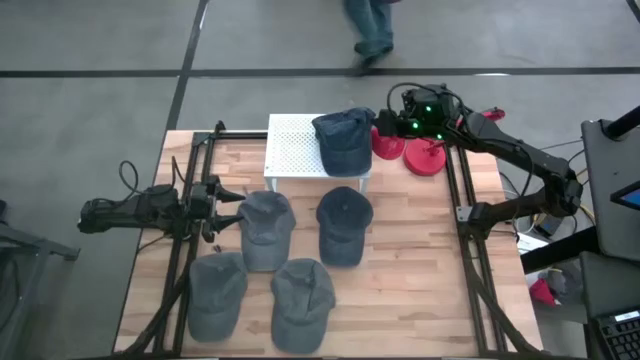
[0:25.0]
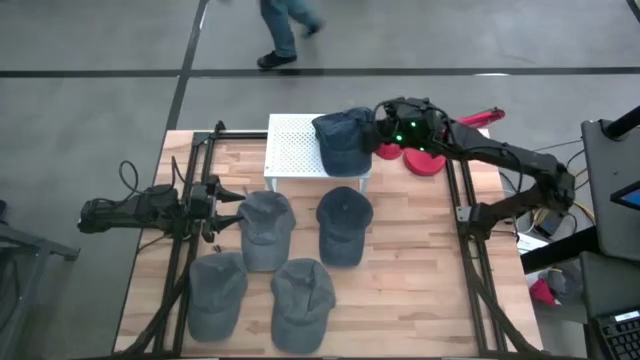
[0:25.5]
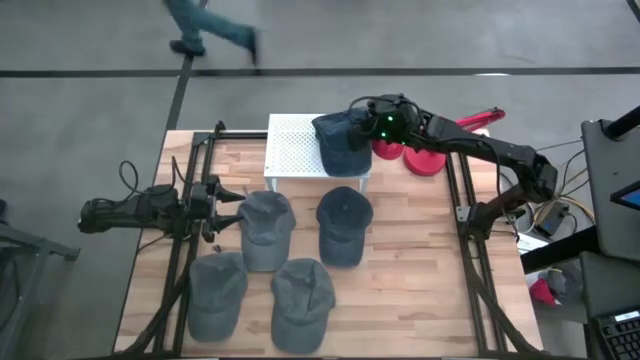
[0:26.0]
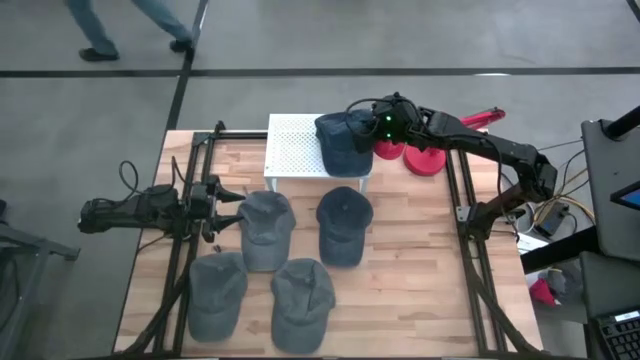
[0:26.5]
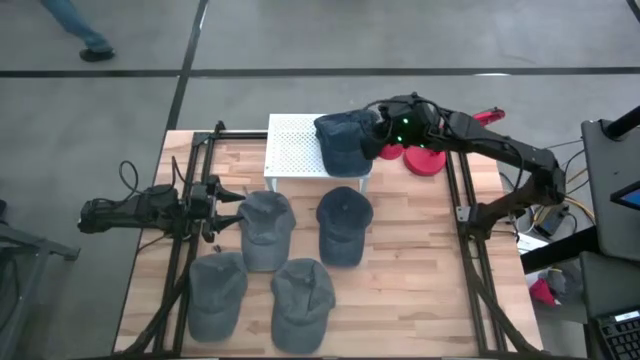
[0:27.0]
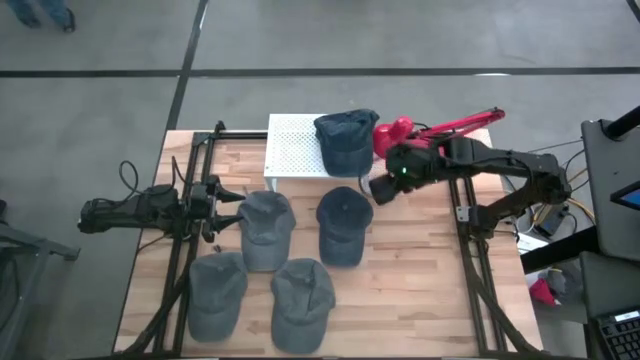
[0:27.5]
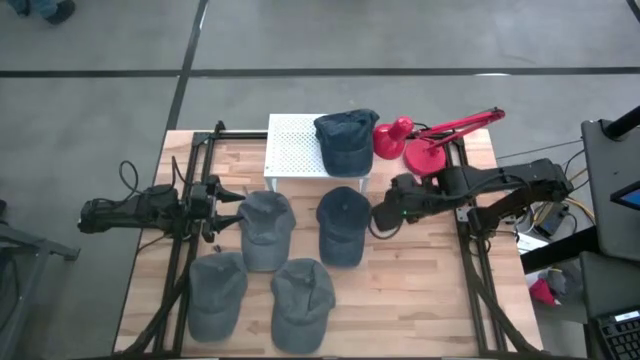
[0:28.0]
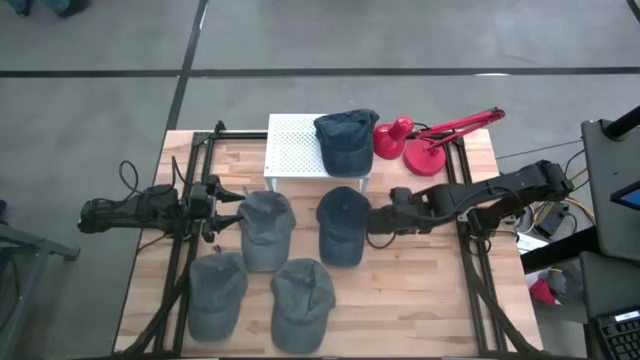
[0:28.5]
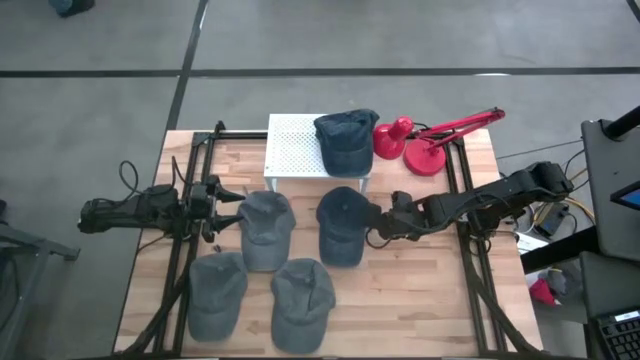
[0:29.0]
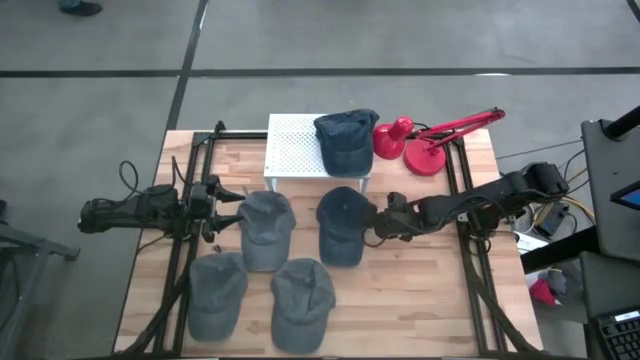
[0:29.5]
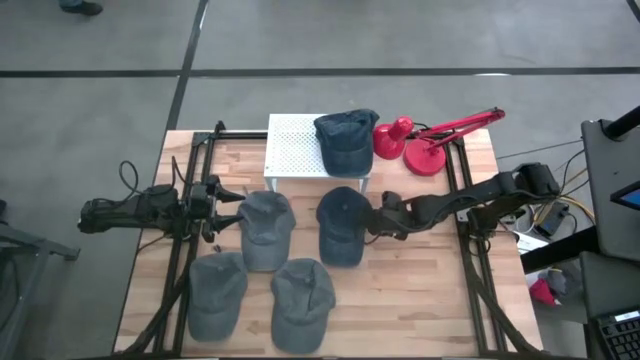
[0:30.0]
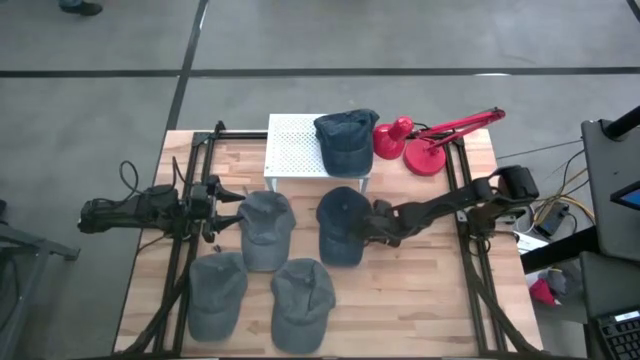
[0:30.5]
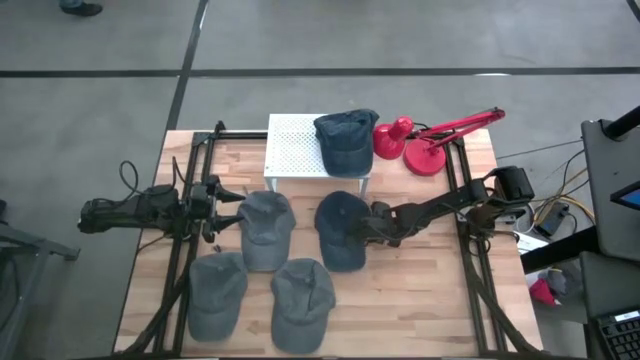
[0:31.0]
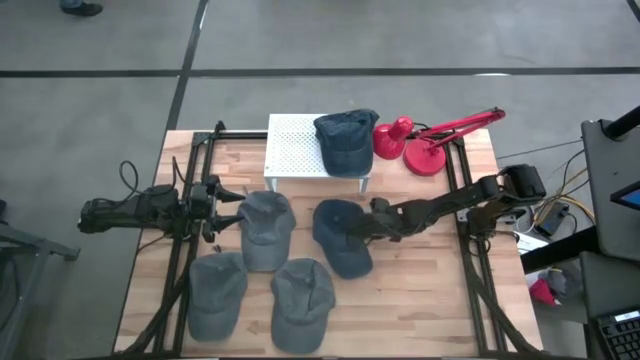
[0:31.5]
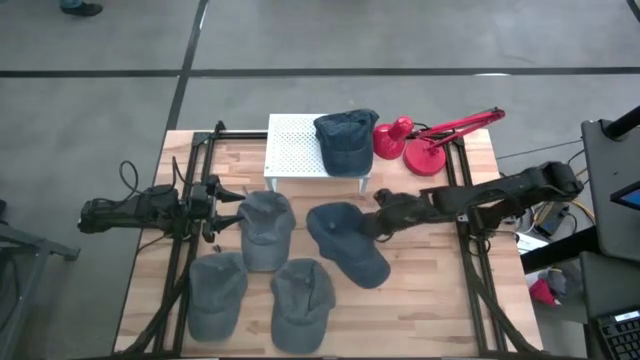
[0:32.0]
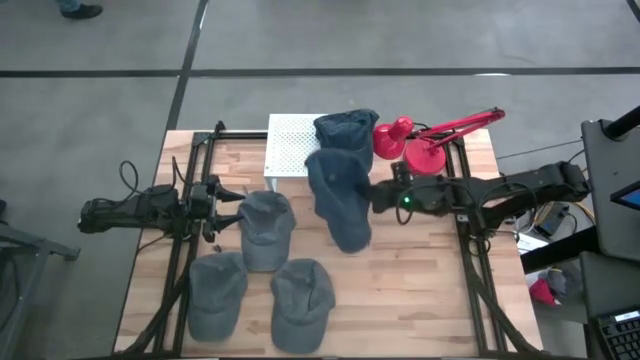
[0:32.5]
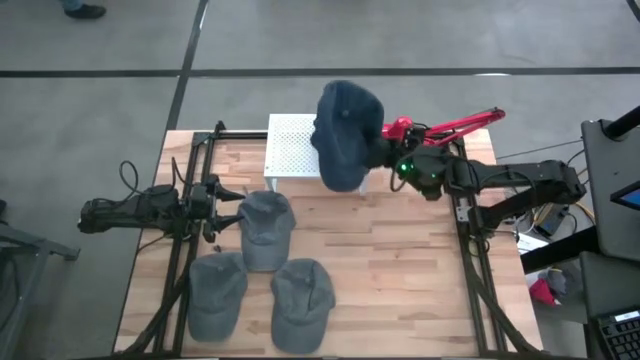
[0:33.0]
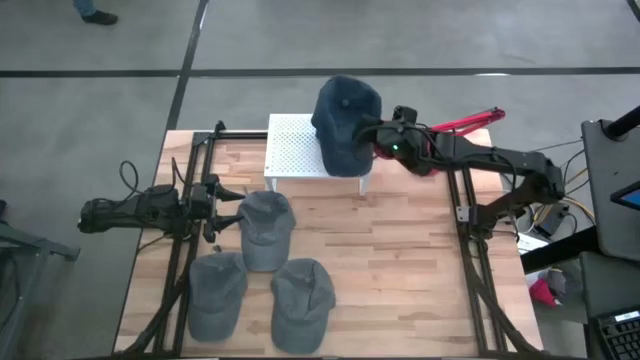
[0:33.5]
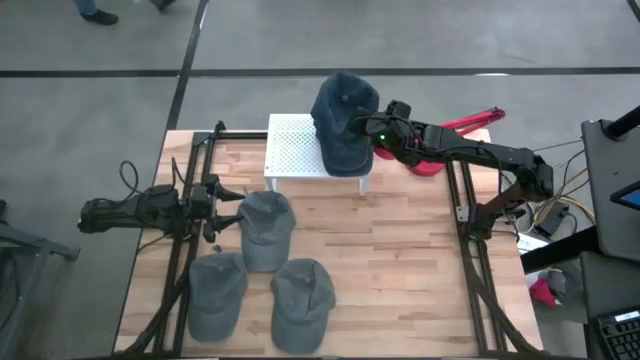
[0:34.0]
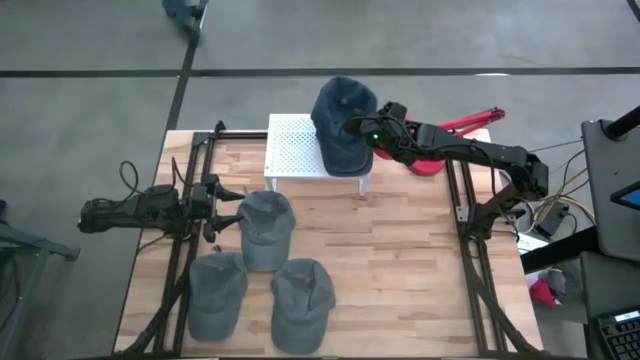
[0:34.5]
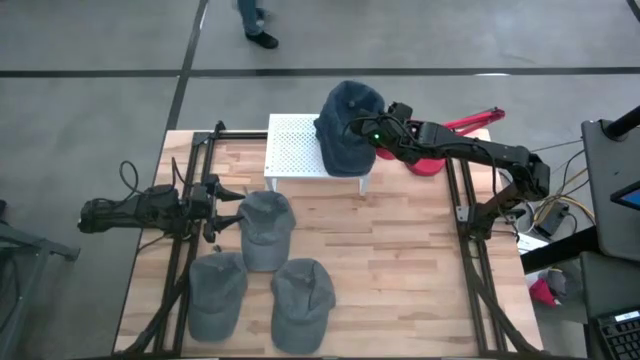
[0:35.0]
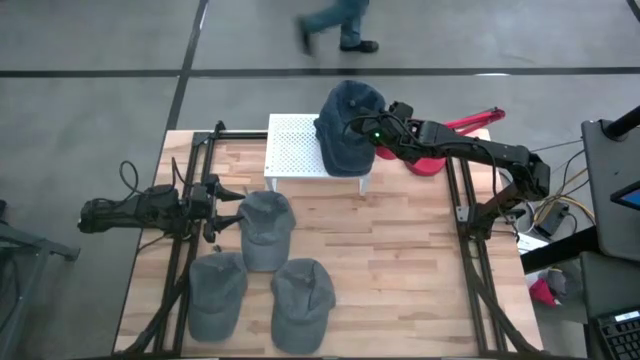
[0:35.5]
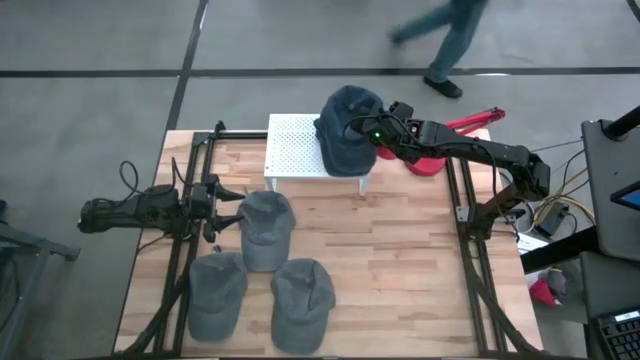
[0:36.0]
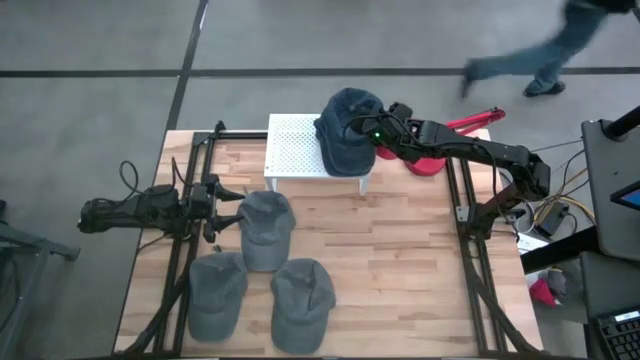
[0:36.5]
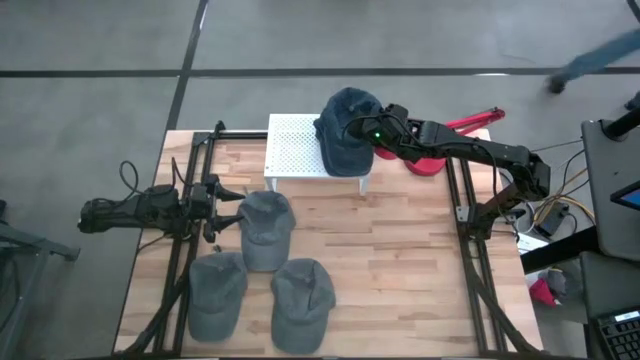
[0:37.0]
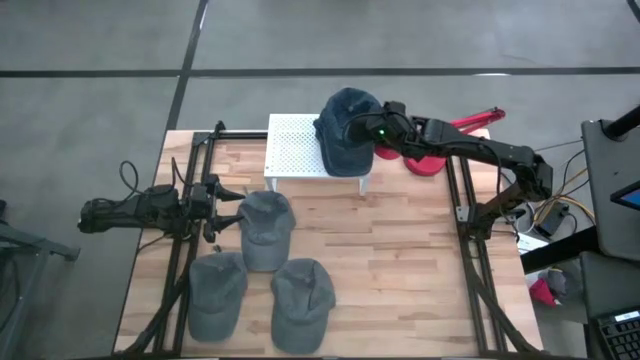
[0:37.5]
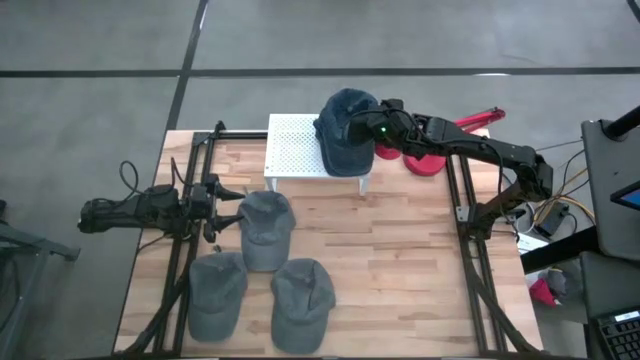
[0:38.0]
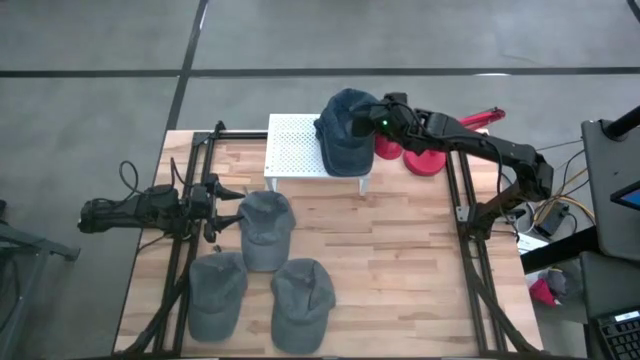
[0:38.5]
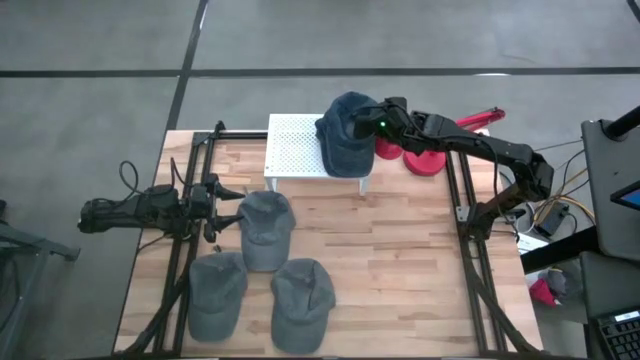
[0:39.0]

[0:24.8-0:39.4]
Task: Pick & Place hat
Stack the dark blue cap on the dark blue cap on the shelf
